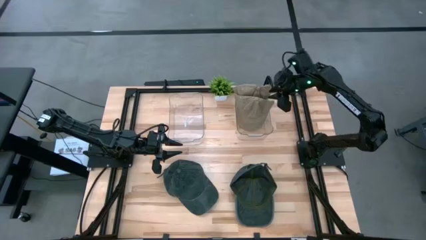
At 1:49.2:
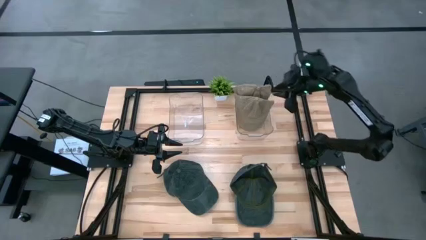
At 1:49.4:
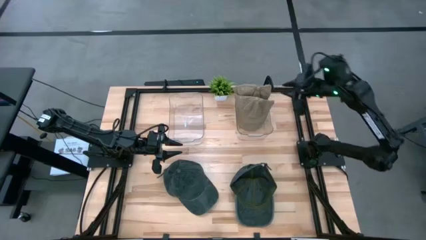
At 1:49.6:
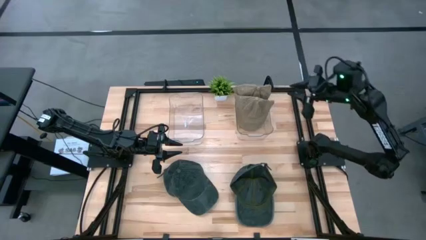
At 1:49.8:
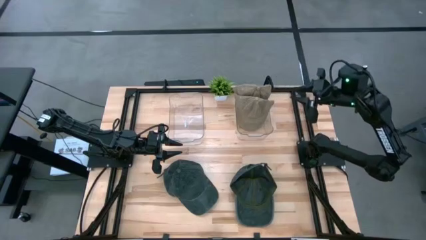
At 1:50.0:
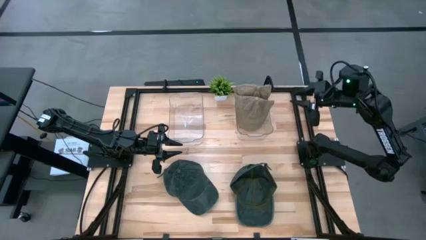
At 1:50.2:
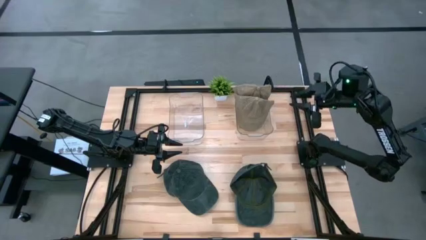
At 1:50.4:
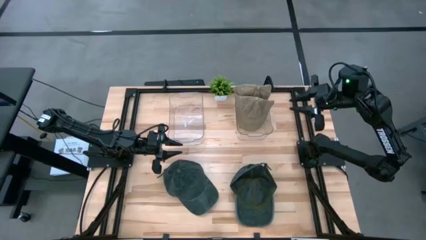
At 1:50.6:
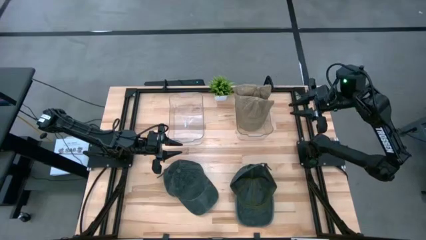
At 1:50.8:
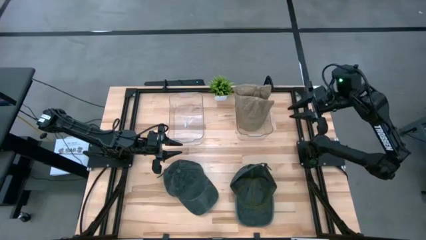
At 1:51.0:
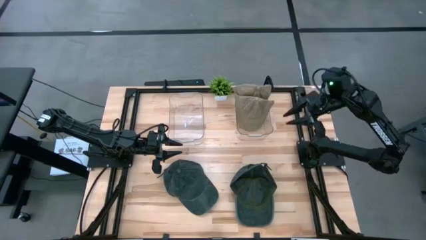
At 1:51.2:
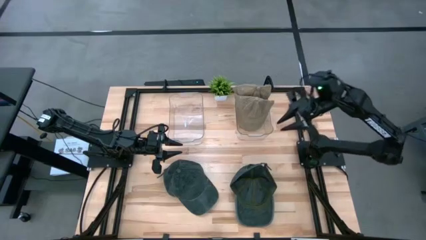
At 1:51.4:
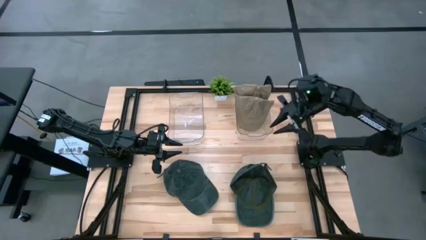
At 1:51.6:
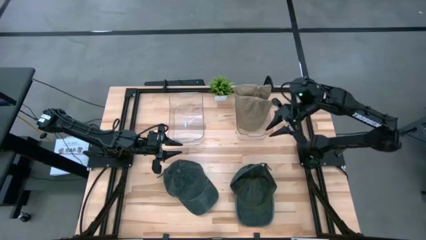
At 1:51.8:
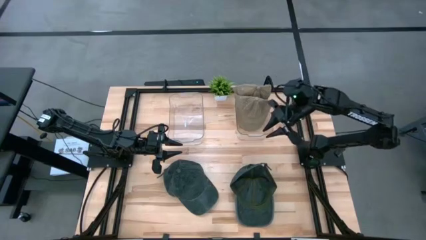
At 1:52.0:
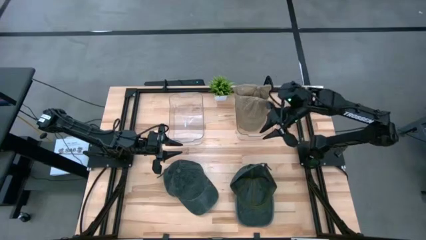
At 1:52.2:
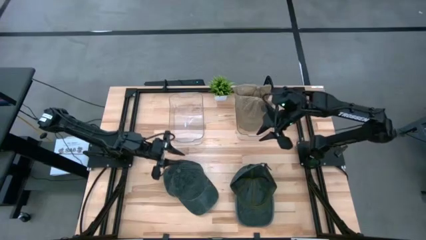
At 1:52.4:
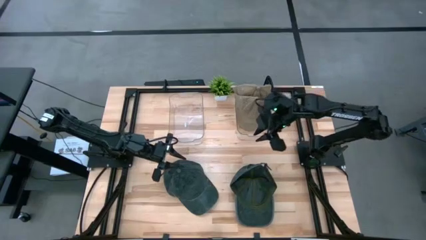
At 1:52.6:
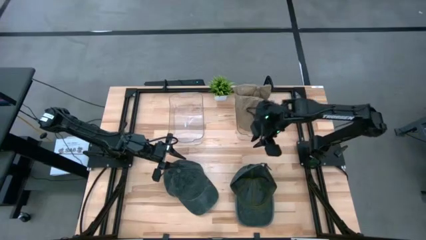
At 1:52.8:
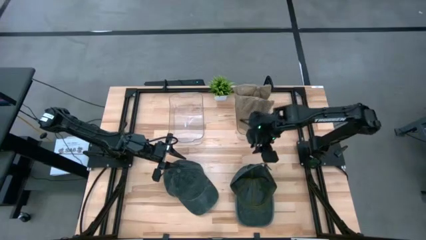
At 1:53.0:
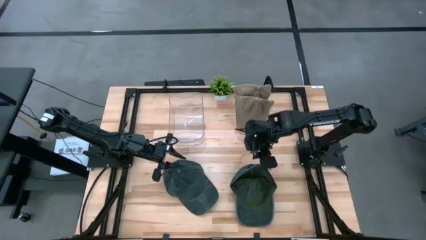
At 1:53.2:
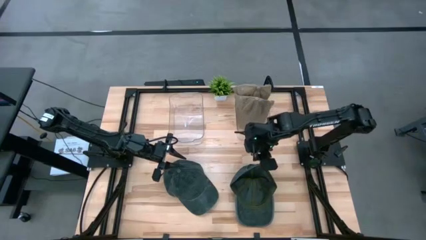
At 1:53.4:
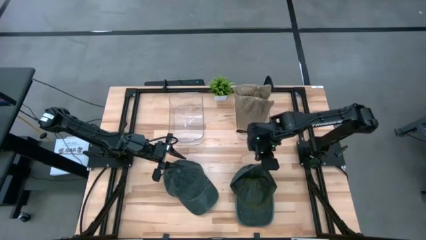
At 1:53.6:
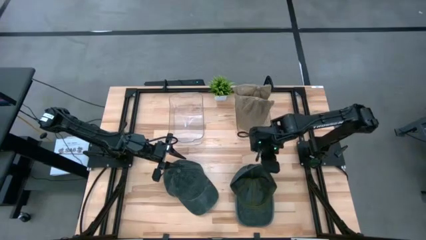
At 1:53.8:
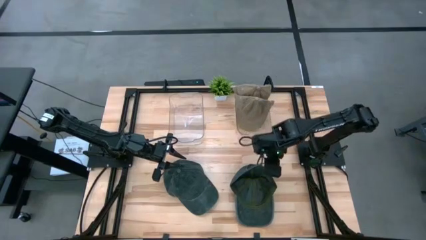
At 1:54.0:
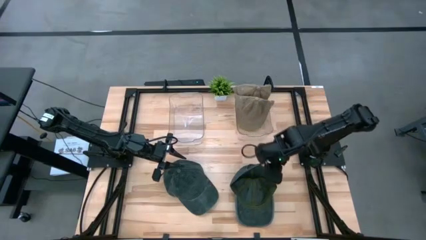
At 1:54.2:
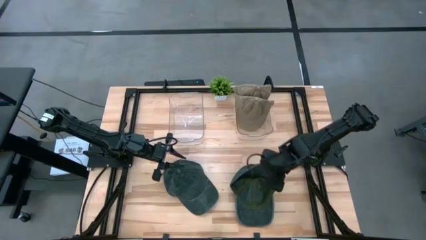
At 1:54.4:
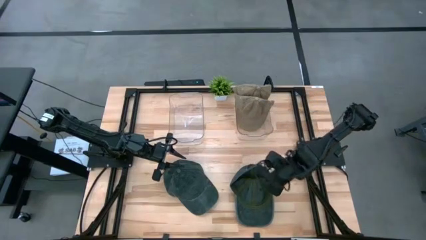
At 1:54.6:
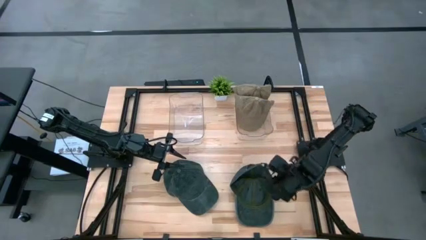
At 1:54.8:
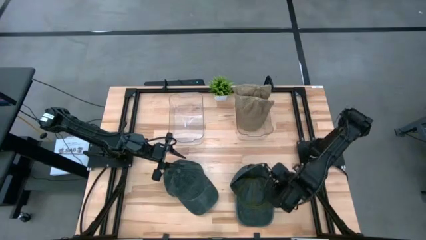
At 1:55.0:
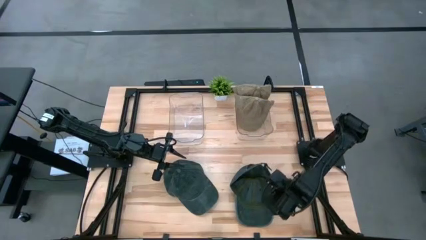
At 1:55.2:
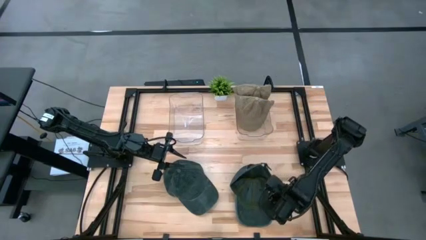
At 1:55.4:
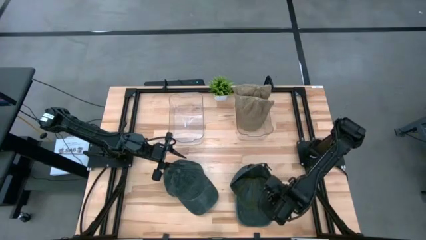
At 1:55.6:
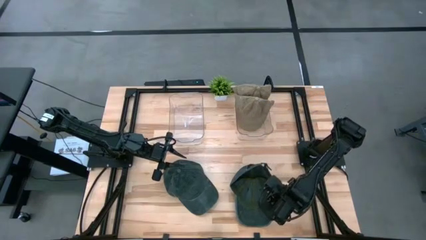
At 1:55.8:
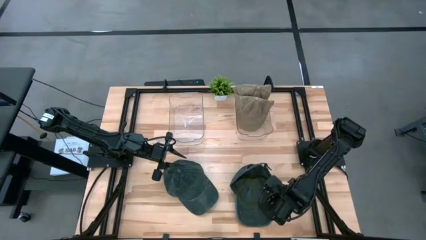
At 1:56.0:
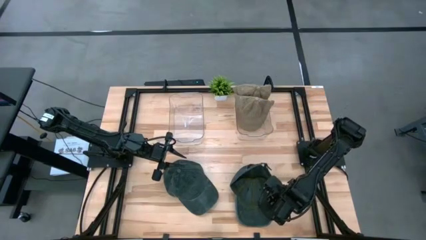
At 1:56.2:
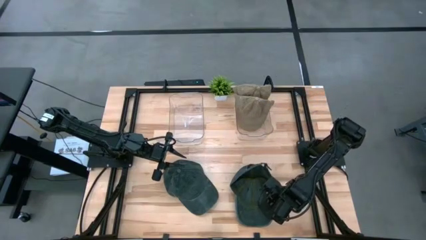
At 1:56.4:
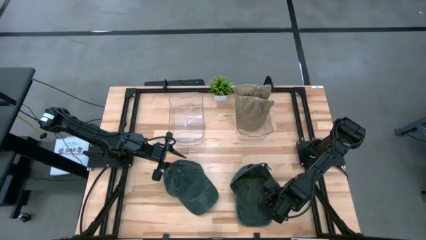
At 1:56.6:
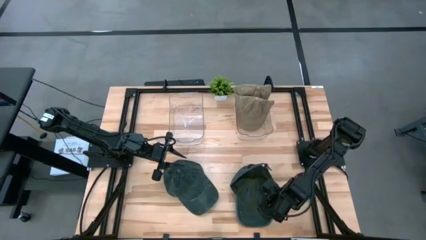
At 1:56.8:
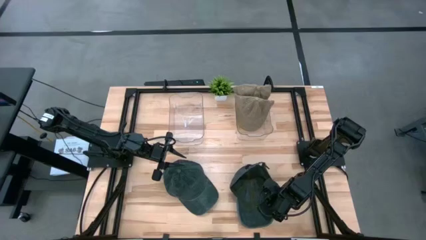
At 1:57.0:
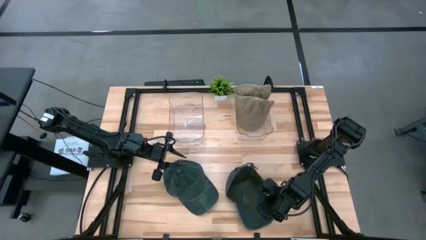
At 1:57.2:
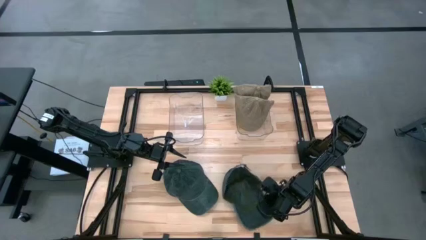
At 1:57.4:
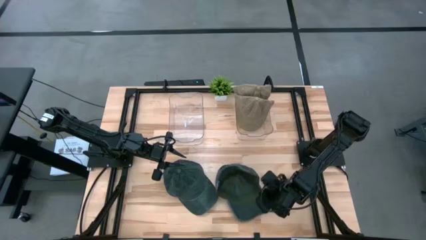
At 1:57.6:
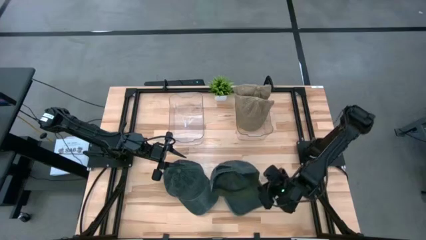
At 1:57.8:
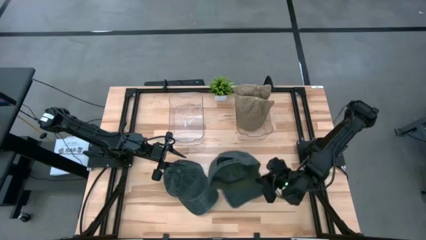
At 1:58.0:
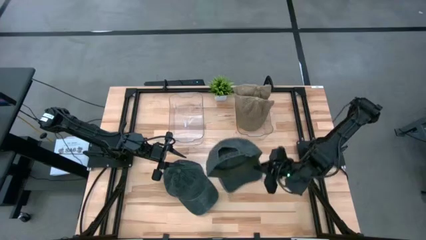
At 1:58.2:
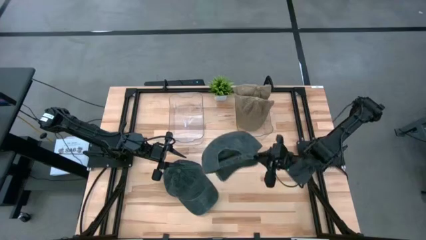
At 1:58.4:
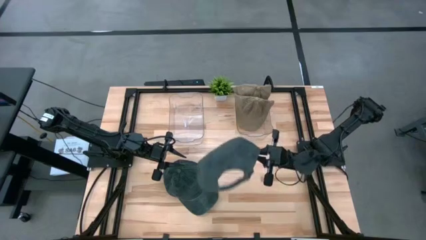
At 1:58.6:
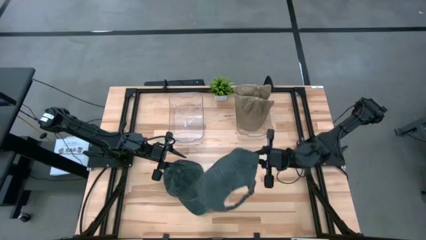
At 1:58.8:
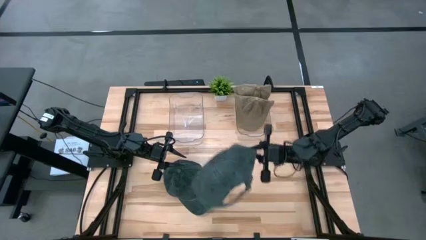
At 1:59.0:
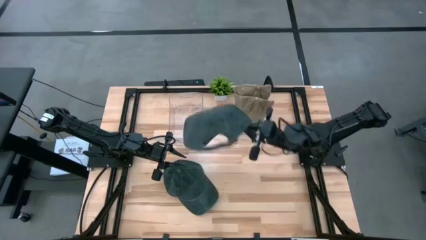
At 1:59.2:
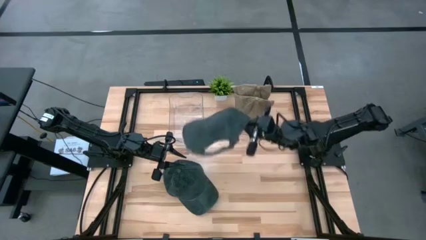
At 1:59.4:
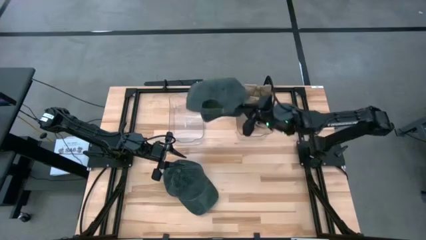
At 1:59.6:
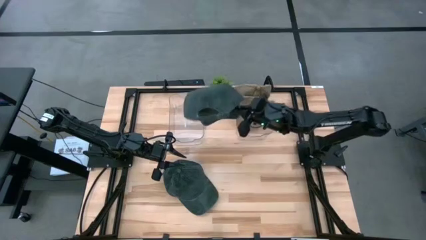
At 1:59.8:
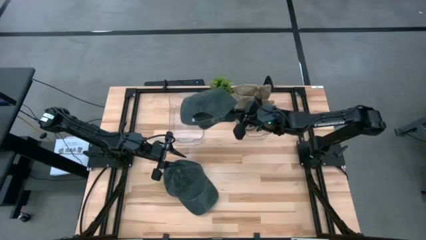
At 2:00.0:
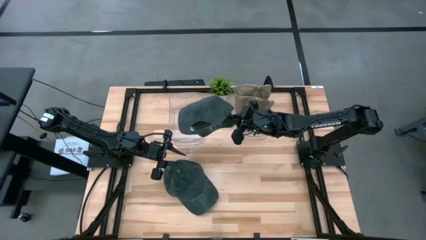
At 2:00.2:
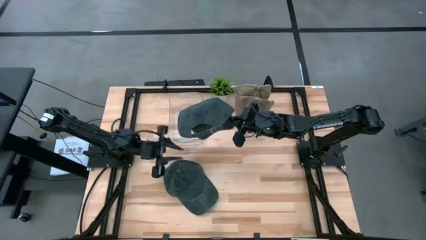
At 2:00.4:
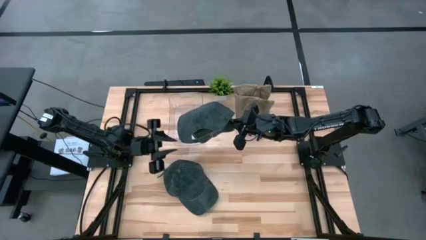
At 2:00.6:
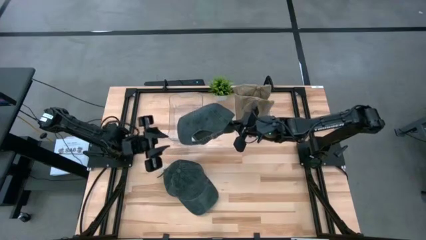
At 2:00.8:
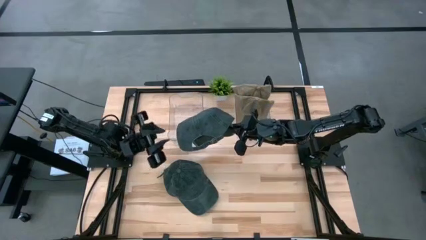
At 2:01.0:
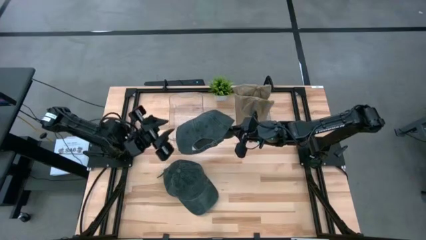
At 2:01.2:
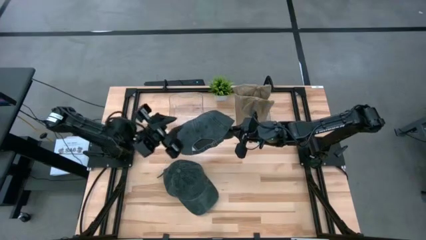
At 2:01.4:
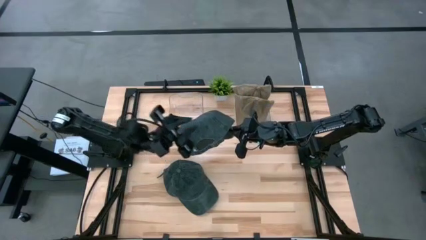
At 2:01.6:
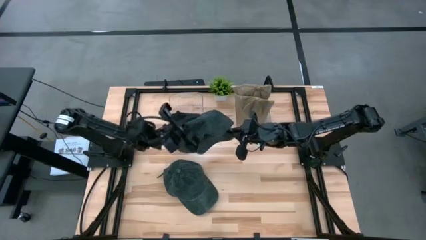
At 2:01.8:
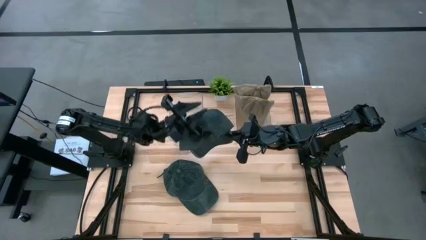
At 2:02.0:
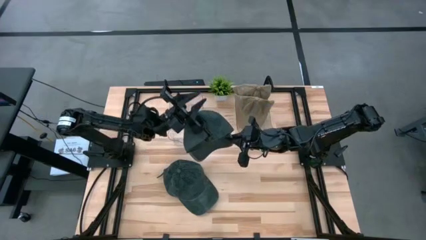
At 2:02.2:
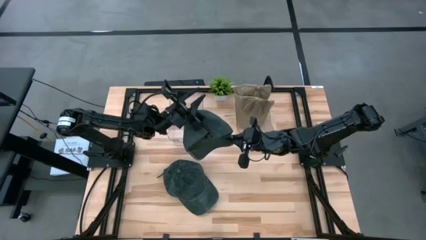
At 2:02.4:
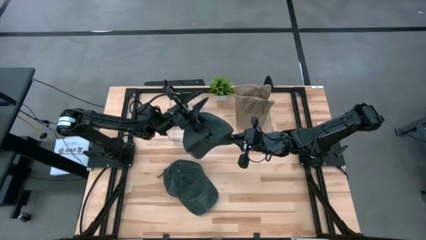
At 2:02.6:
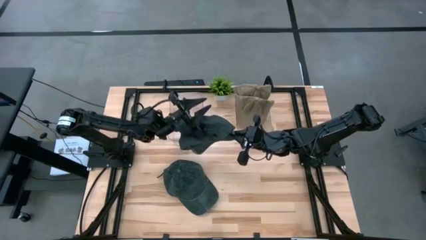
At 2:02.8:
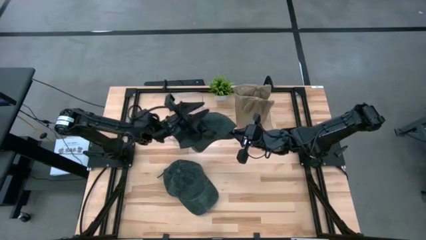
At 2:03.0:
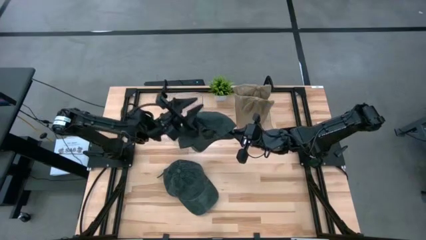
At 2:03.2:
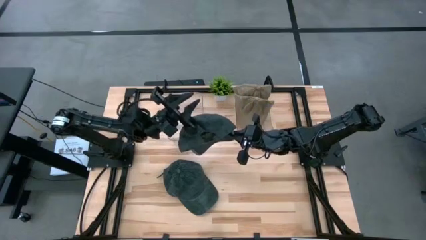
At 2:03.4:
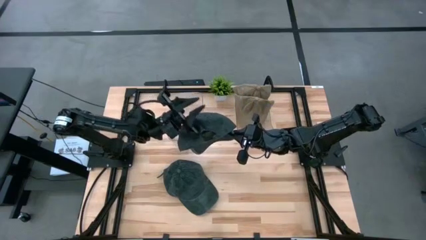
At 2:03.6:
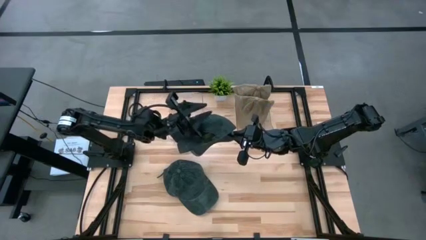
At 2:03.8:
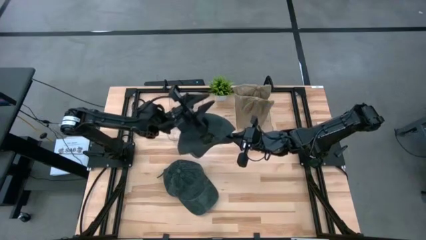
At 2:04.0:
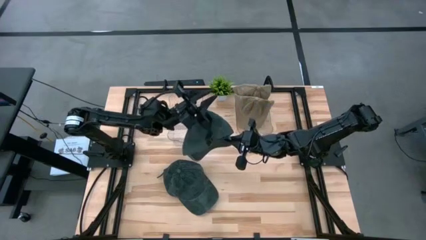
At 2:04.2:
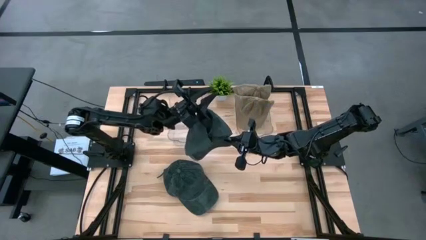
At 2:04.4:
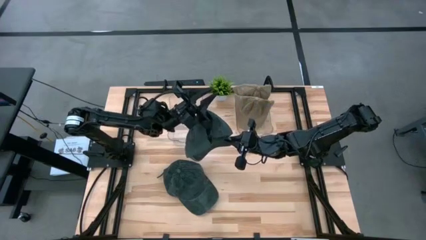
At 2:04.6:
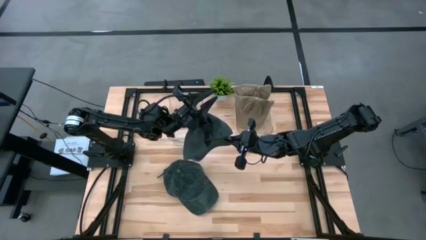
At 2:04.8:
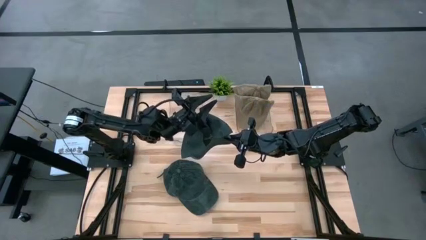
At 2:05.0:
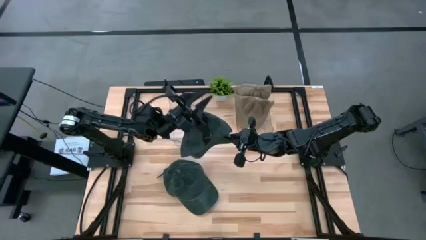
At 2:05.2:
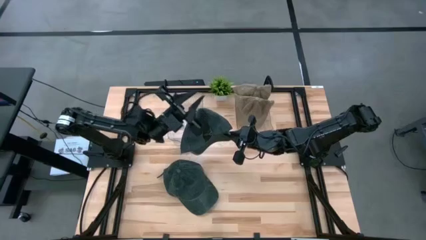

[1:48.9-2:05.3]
Task: Pick & Place hat
Put the right black cap into the left transparent container
